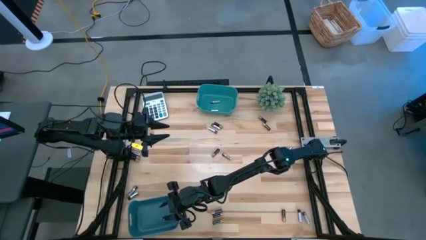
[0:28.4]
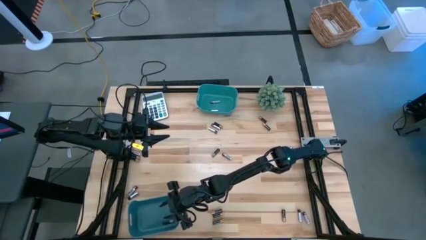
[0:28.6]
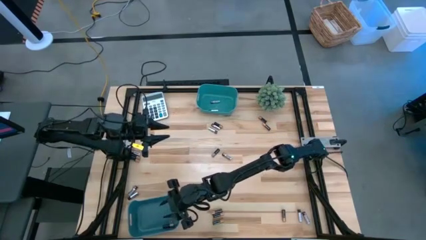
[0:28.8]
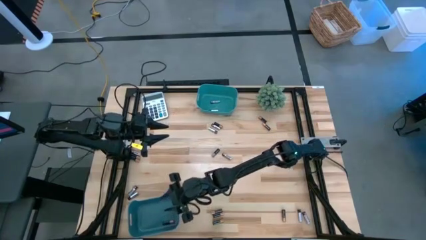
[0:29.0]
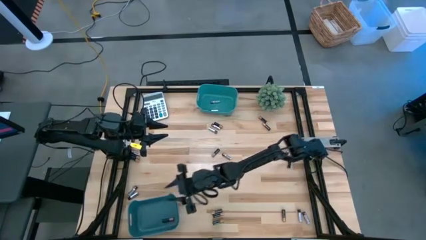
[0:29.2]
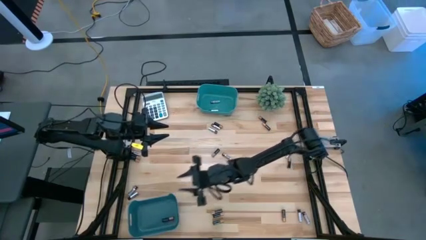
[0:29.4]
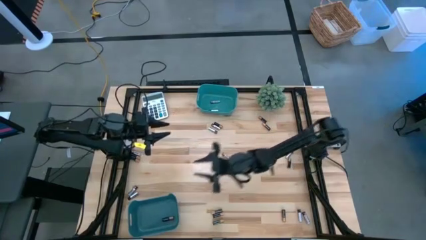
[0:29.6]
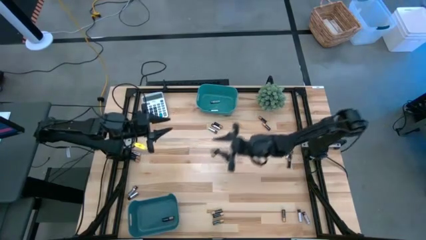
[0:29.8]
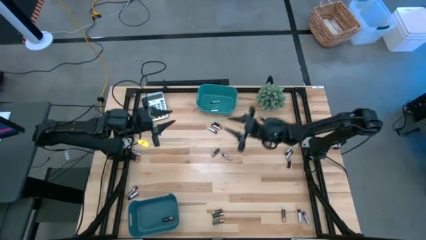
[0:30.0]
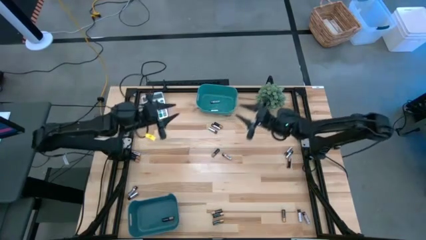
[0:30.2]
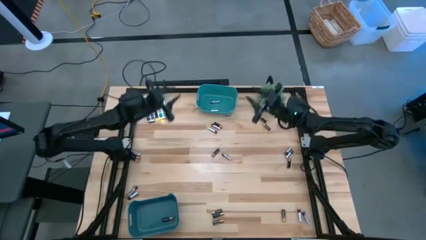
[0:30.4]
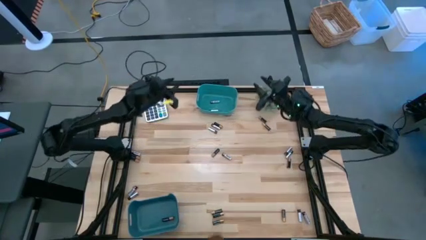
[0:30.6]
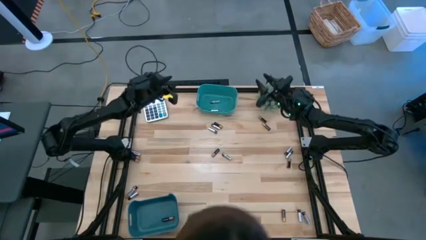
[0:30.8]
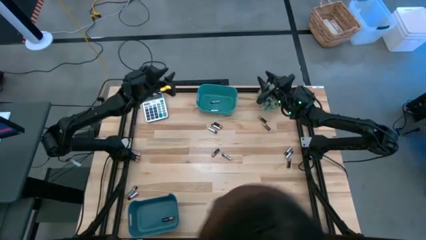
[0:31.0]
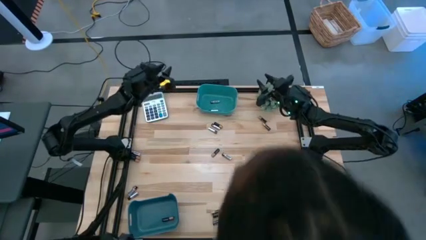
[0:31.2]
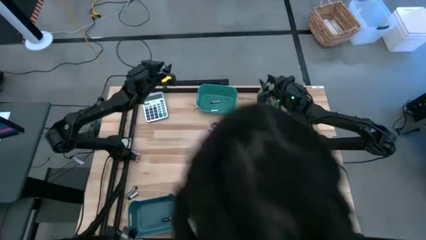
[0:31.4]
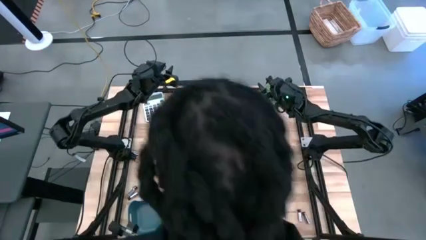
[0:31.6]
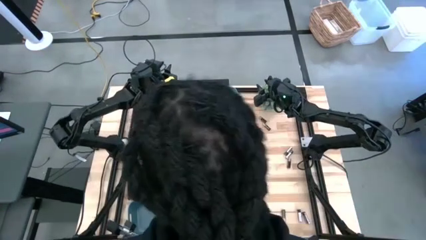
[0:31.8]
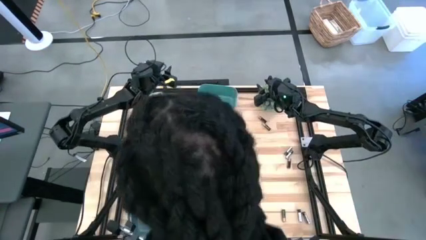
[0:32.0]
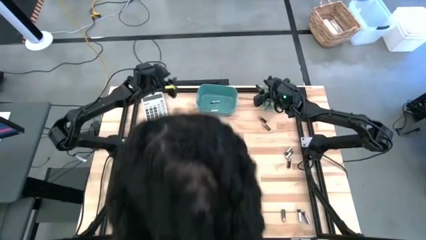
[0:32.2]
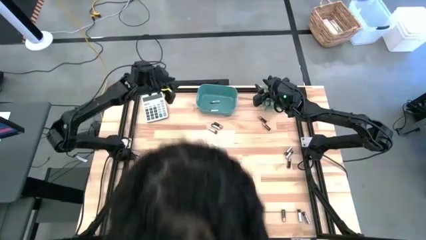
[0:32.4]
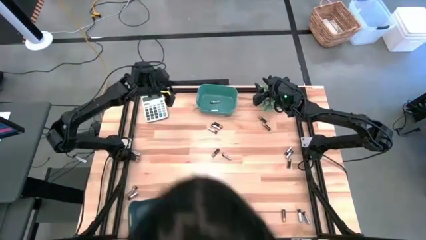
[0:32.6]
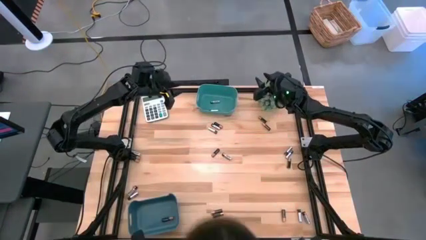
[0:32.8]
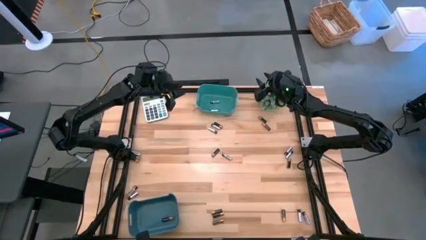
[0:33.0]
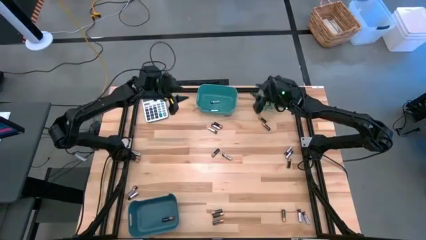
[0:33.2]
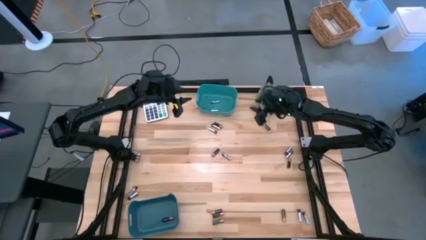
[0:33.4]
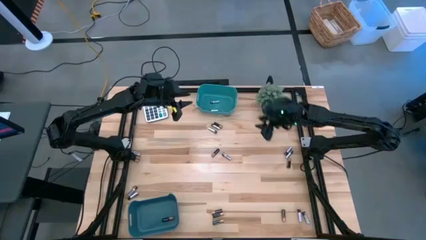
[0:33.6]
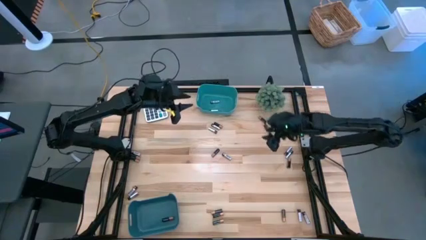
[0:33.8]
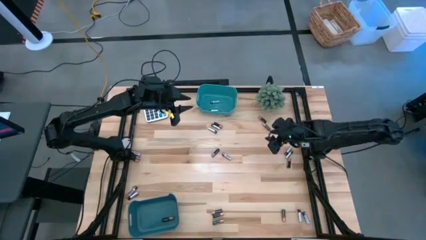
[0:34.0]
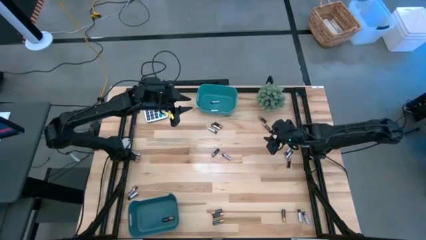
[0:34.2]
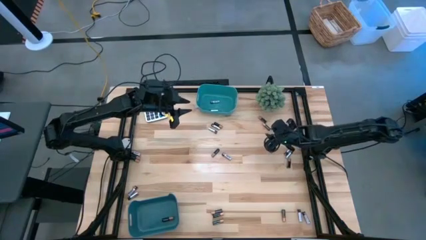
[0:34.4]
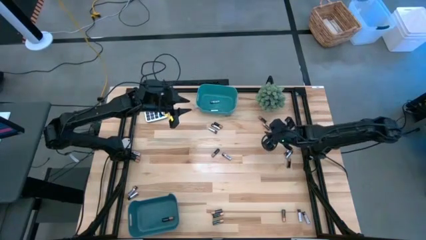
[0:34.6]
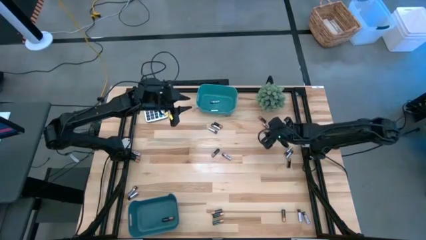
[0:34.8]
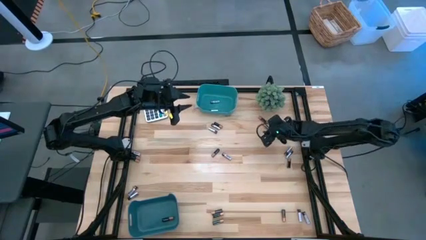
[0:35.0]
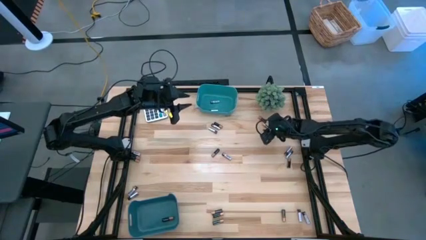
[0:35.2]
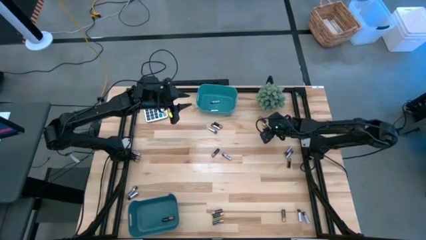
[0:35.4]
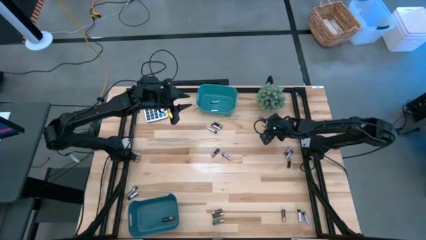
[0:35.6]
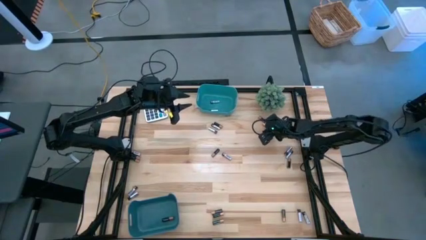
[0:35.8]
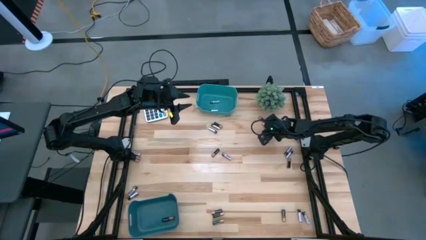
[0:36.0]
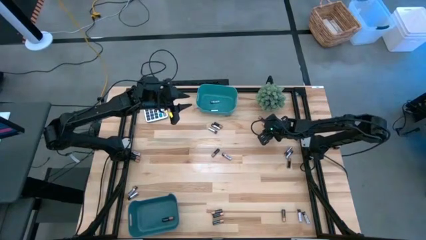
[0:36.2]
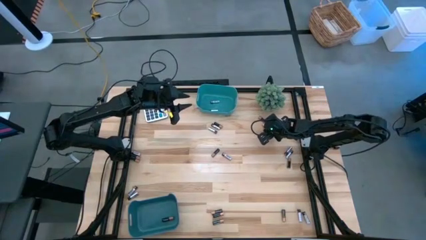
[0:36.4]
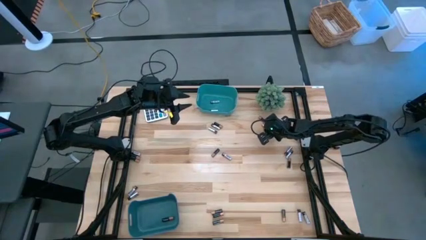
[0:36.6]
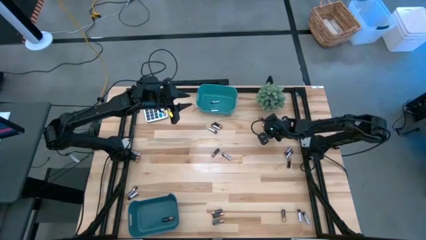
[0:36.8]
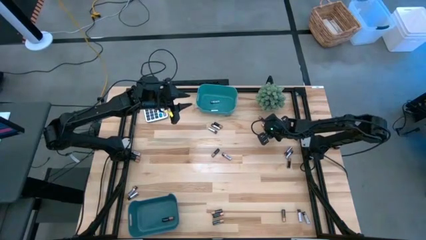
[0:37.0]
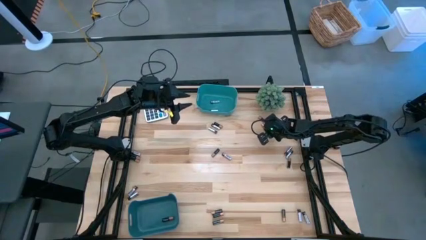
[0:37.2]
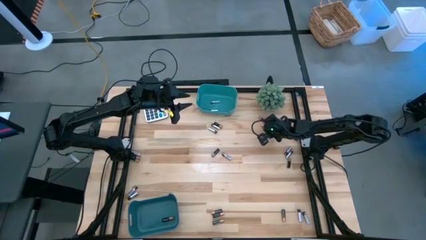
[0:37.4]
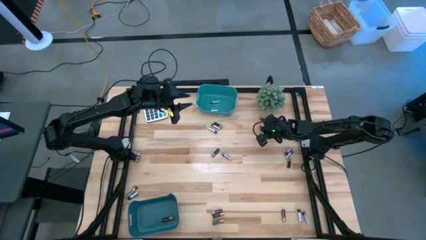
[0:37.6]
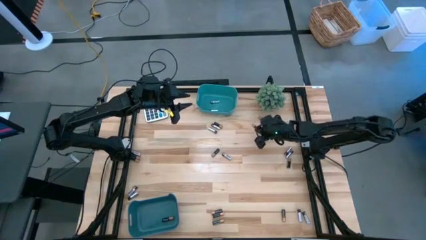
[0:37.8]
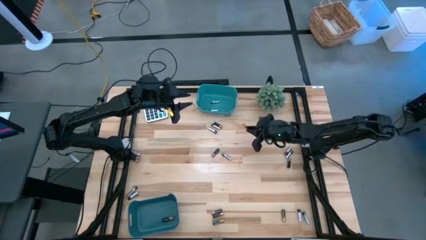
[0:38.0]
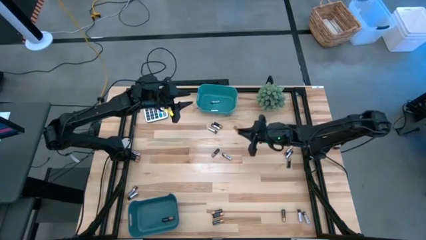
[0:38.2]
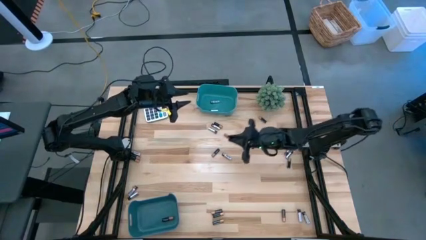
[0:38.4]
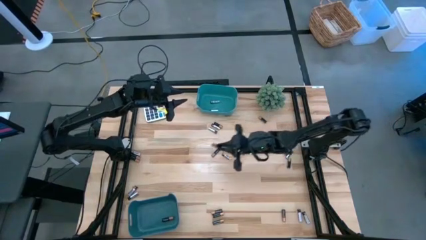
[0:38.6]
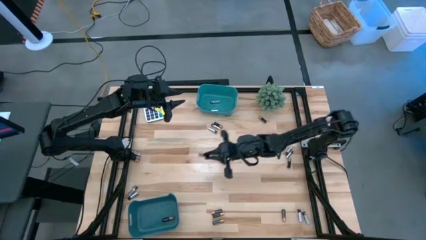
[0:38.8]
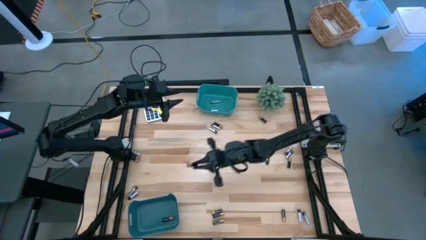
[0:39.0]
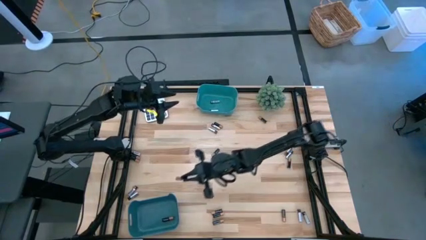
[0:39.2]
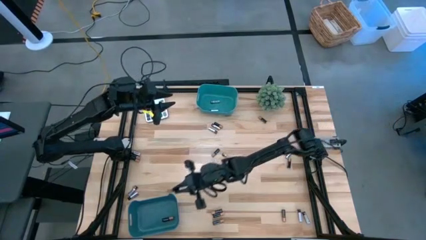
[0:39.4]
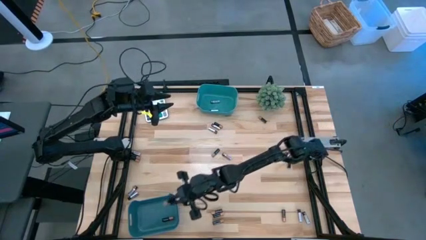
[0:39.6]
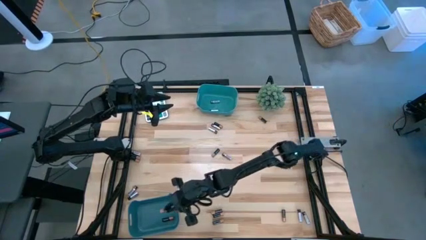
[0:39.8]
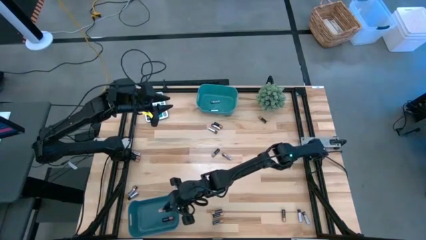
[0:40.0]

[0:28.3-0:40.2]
Task: Sort batteries
Put the gold battery into bottom green bin

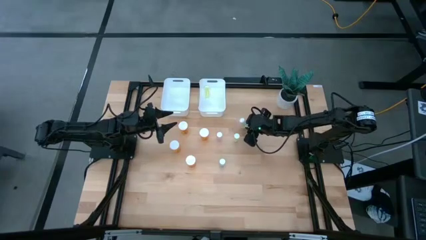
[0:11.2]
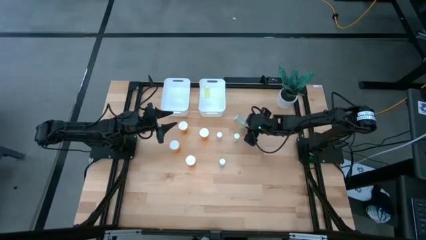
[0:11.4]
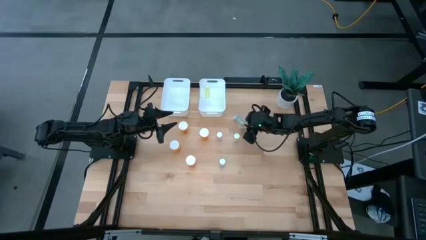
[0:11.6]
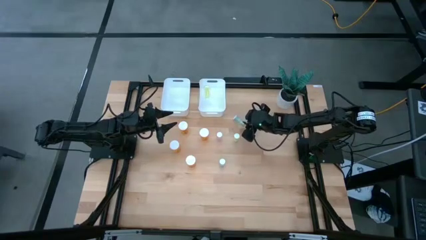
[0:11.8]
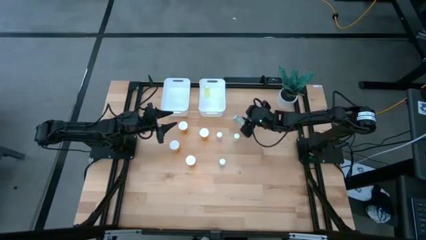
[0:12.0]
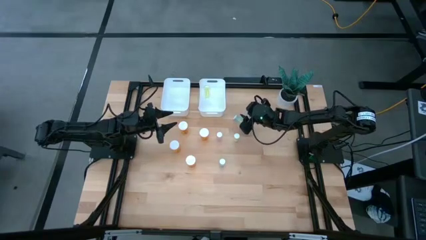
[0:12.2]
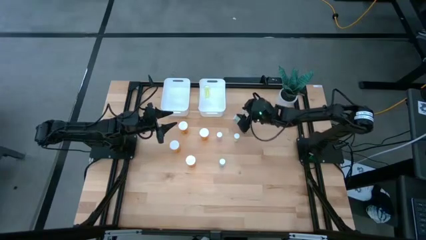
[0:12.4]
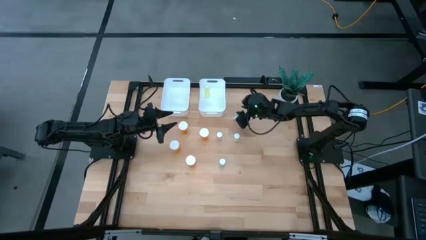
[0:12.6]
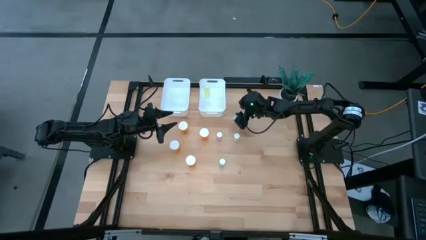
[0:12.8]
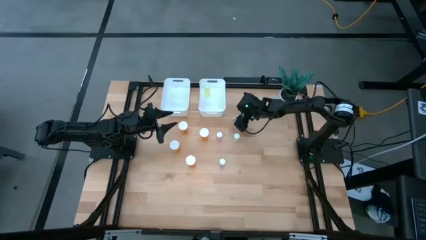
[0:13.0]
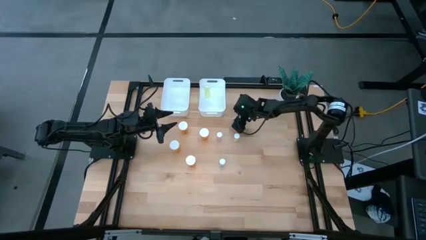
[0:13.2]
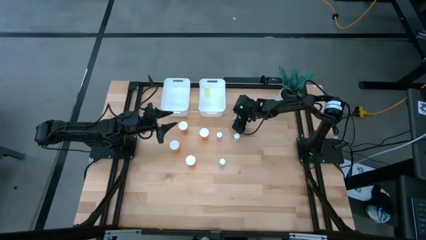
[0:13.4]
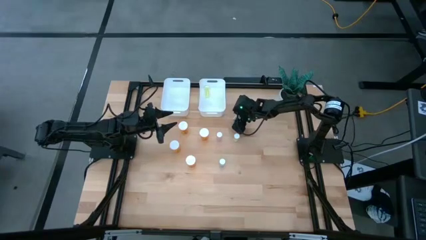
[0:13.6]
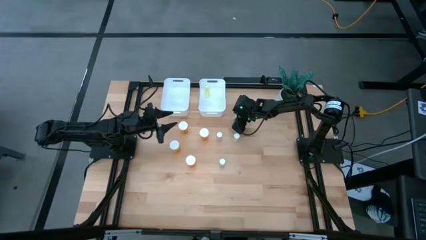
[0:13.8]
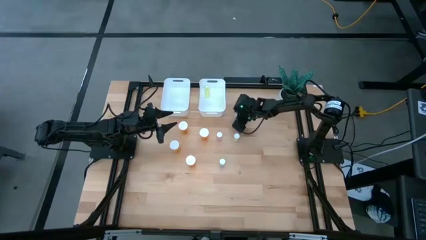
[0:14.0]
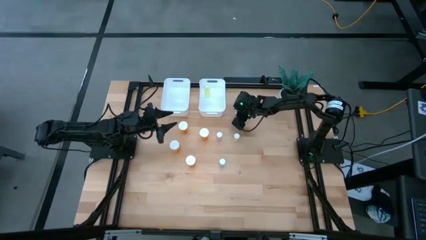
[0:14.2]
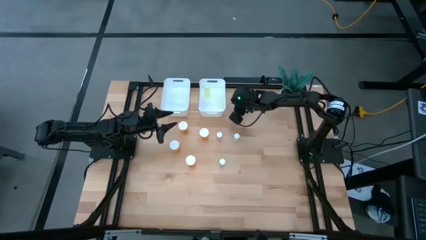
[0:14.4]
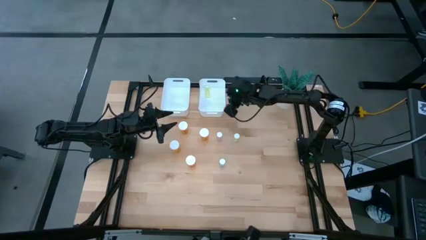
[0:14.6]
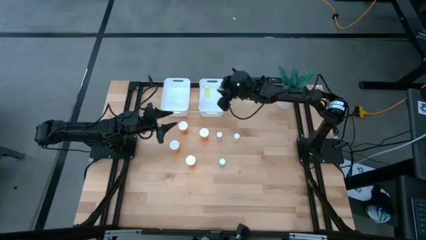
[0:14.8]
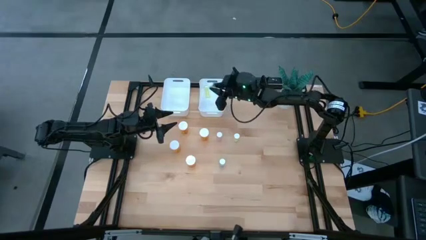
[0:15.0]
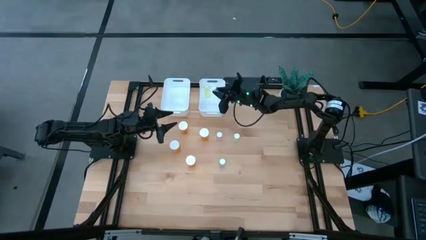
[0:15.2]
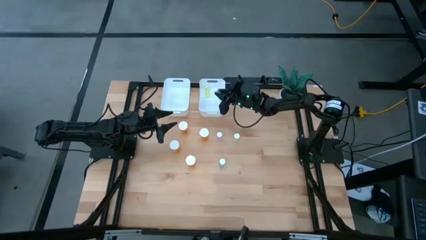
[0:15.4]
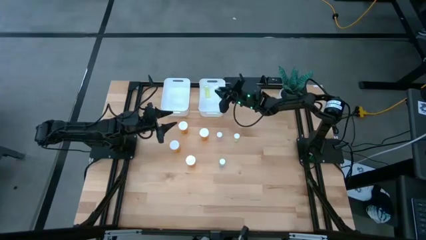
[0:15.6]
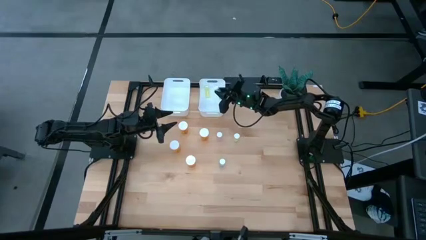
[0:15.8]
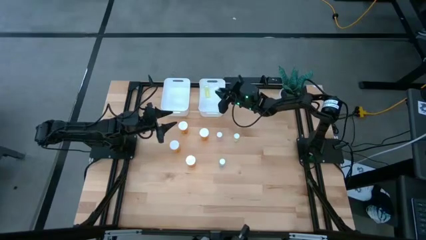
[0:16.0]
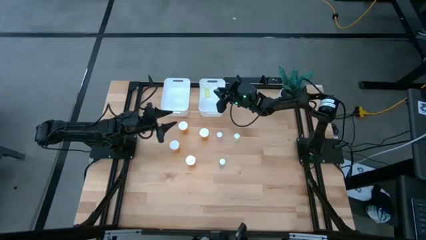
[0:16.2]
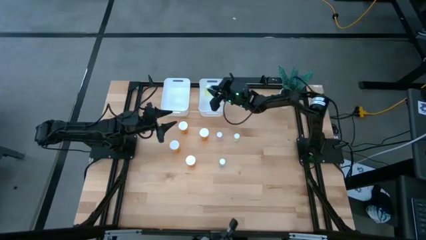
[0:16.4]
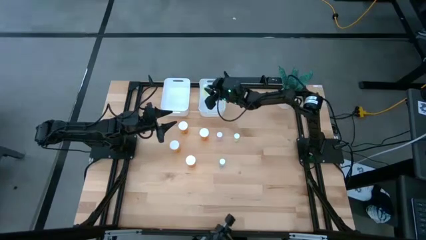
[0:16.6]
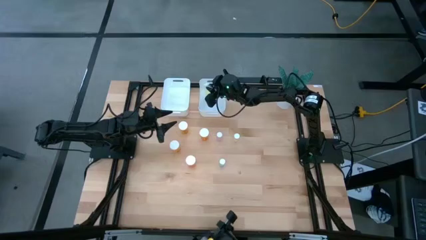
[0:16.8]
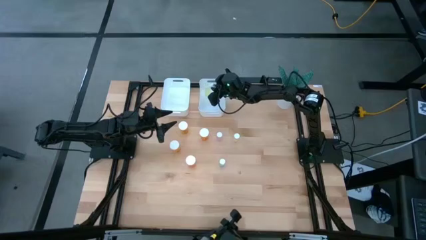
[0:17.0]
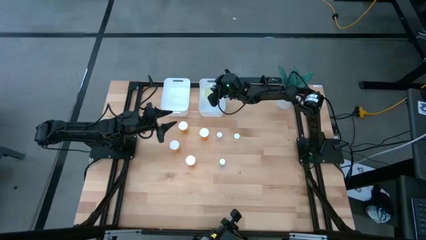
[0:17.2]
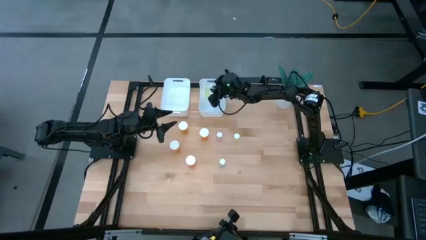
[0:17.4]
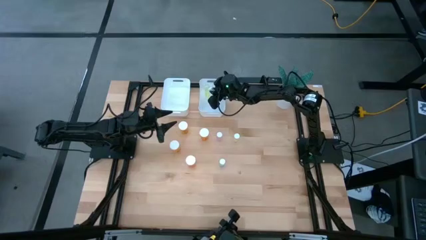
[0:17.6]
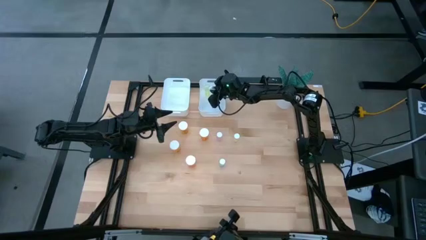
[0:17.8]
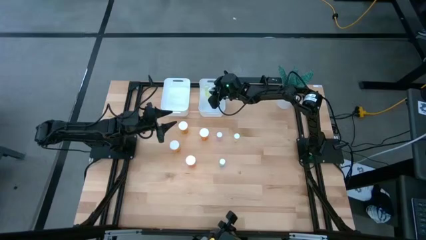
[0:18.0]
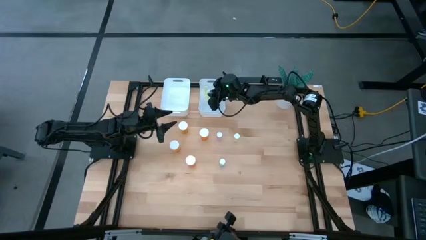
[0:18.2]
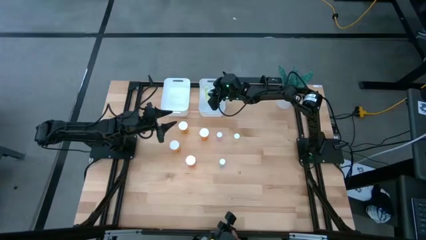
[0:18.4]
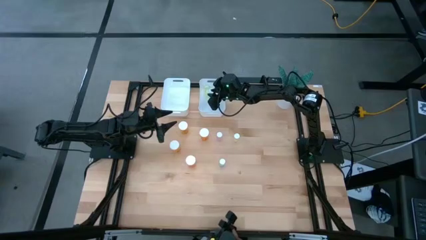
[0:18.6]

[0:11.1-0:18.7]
Task: Pick and place medicine bottles into bin by pill shape (circle, oval)
Put the small blue pill bottle into the right white bin
